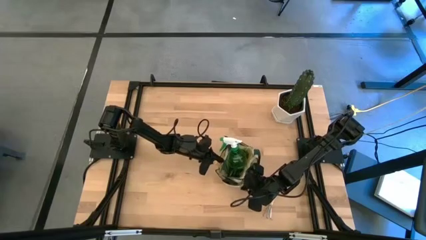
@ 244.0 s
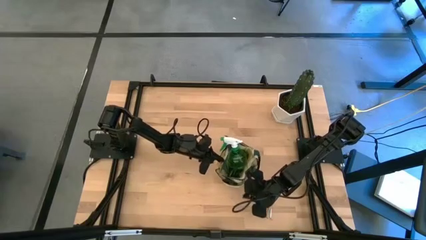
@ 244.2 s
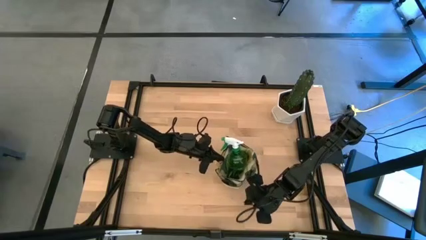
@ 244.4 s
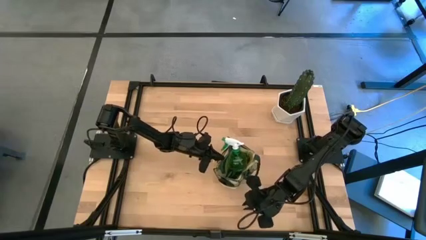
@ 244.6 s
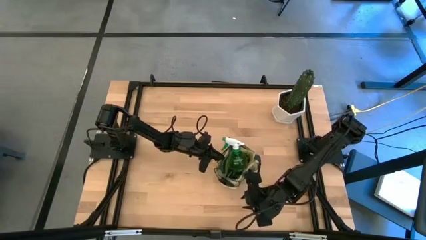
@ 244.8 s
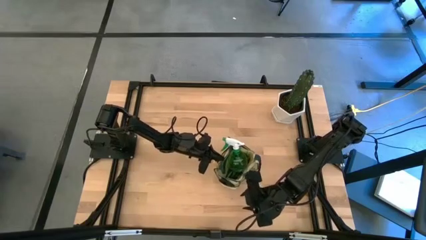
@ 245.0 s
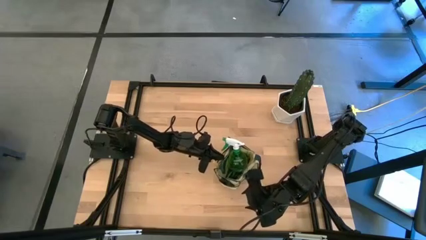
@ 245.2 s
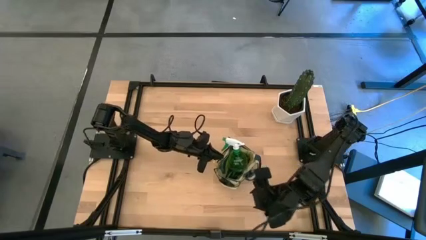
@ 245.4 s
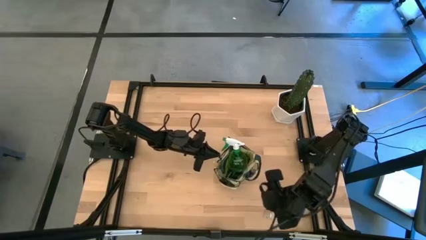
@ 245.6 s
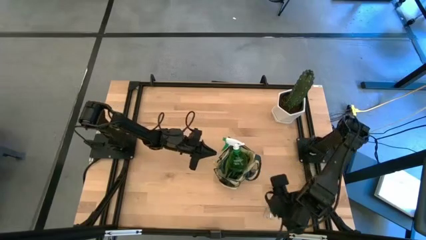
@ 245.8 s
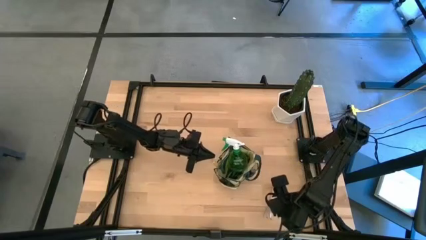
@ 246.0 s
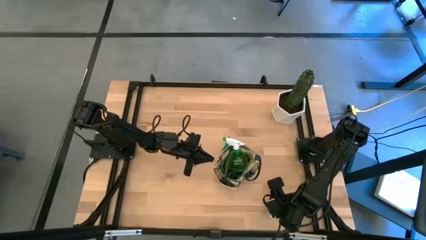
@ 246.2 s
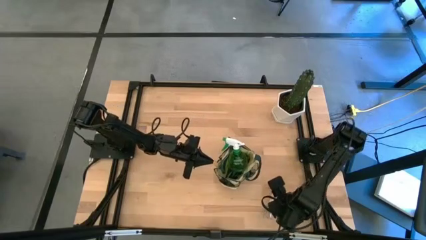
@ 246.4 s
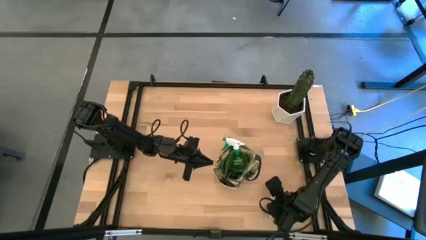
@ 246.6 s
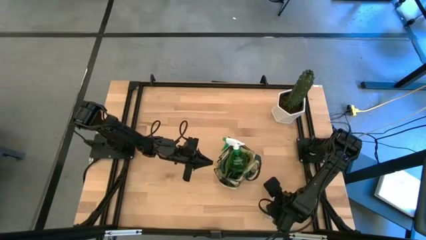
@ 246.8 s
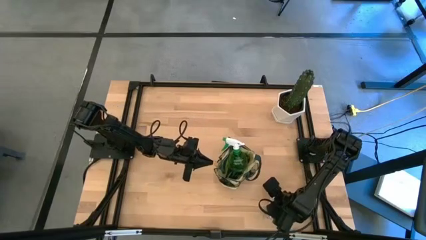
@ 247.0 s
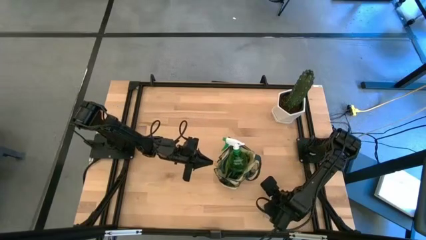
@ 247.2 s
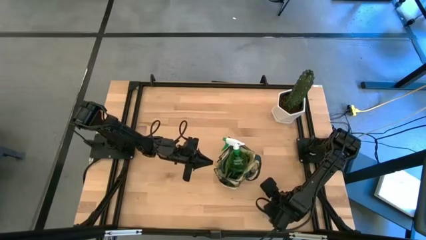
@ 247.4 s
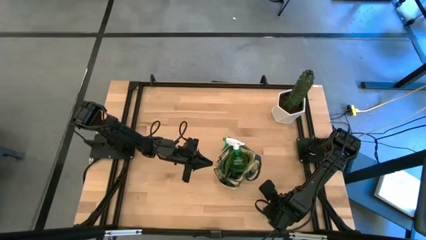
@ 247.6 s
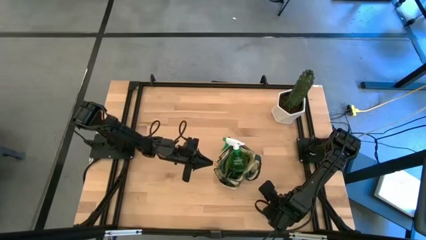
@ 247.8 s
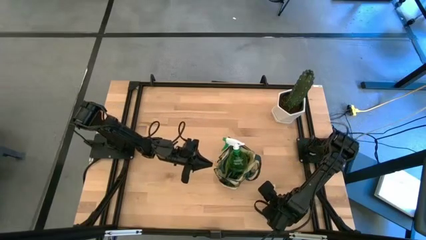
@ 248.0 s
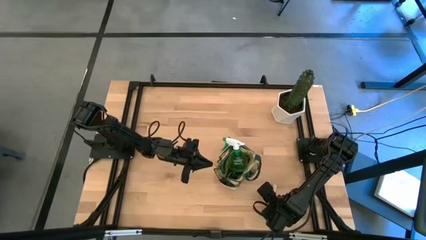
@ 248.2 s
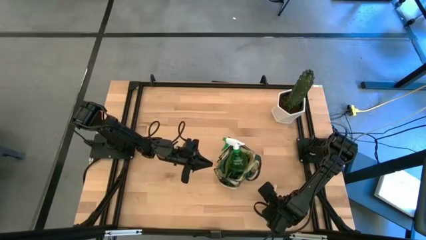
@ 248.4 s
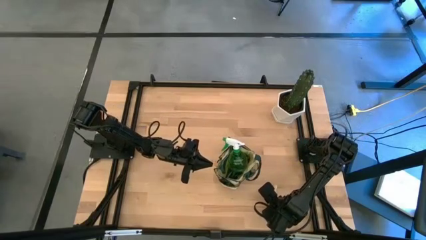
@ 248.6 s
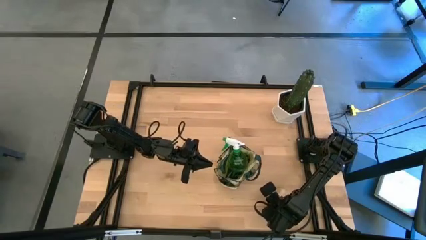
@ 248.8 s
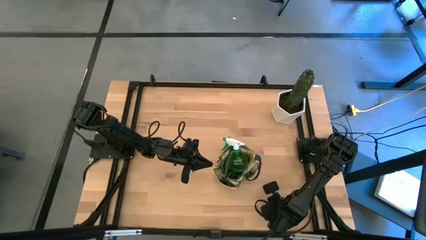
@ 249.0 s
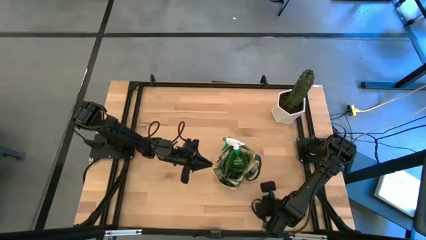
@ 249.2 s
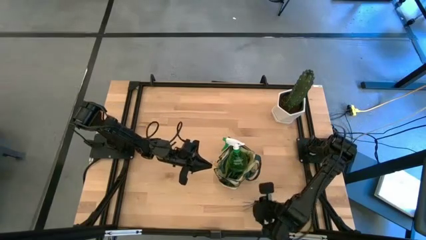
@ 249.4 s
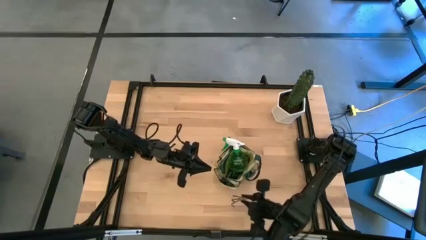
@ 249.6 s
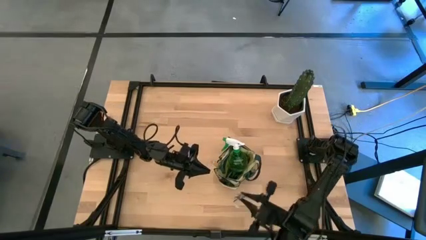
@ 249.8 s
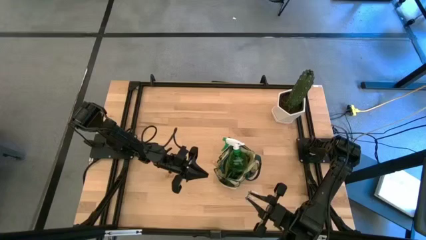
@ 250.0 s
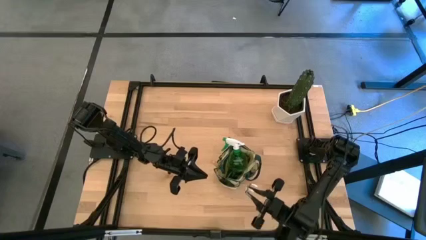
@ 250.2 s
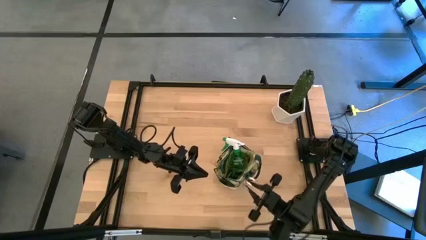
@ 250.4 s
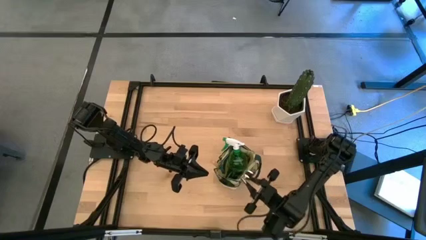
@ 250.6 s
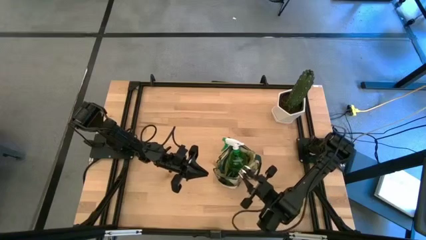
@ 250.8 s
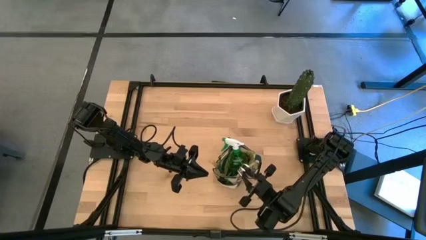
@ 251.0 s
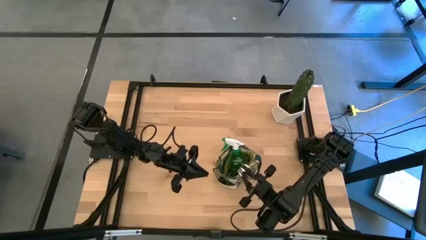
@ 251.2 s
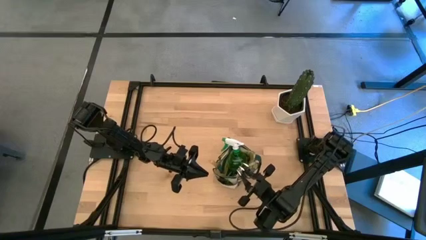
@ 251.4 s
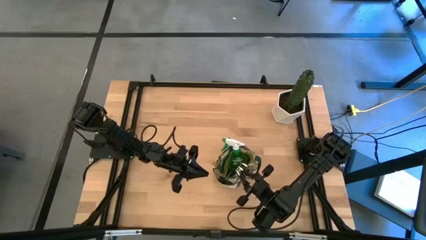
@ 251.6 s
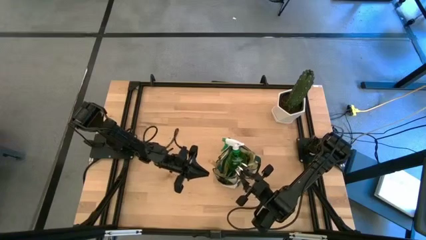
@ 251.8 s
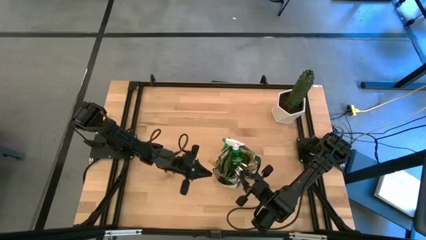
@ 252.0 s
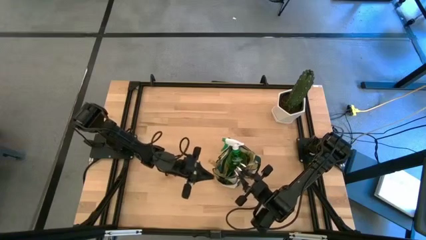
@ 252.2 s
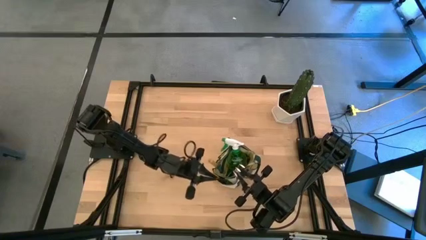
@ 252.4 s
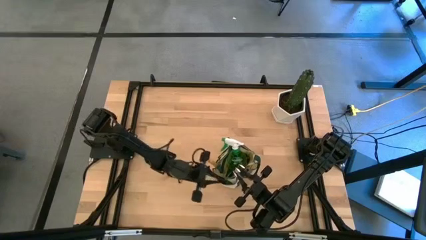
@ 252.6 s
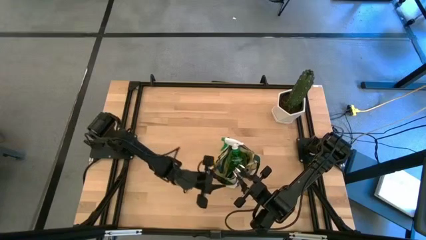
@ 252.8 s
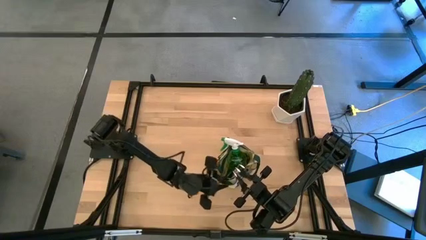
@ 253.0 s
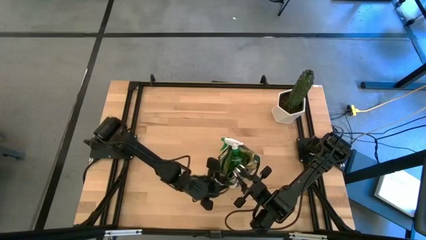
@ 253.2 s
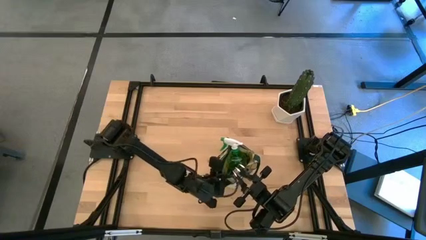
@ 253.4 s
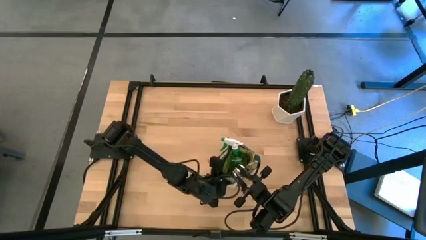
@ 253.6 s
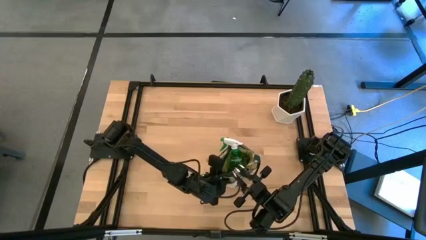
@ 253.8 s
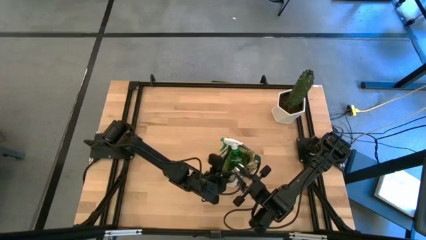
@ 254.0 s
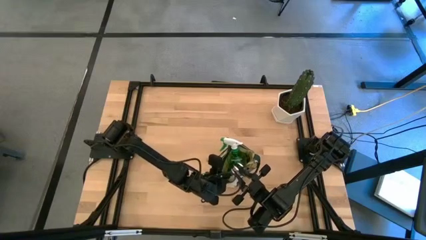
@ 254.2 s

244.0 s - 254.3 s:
Task: Pick & Place Garden tools in Gardening bag
Put the brown hand rake into the green gardening bag
